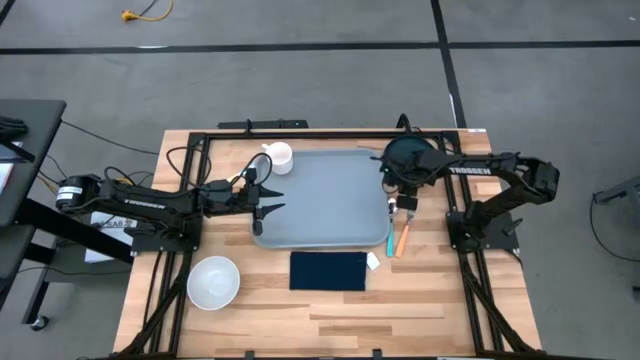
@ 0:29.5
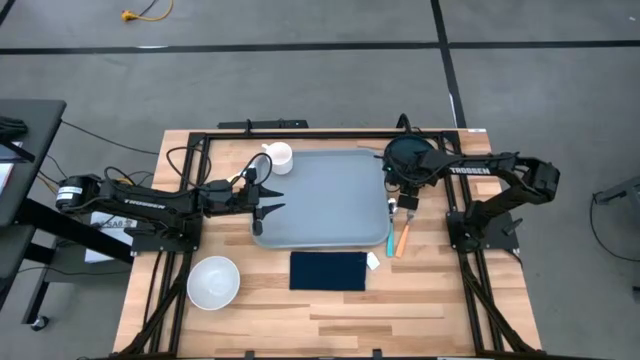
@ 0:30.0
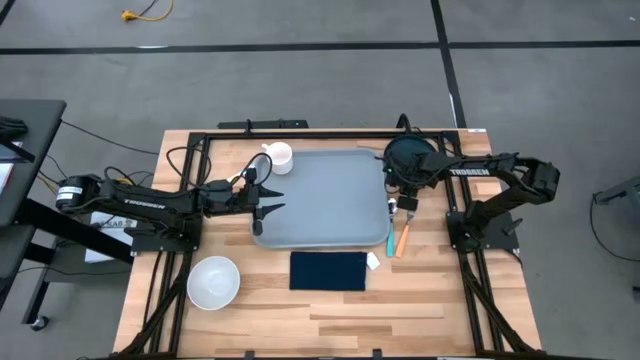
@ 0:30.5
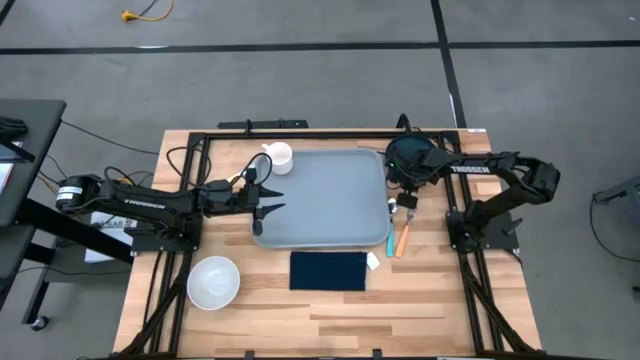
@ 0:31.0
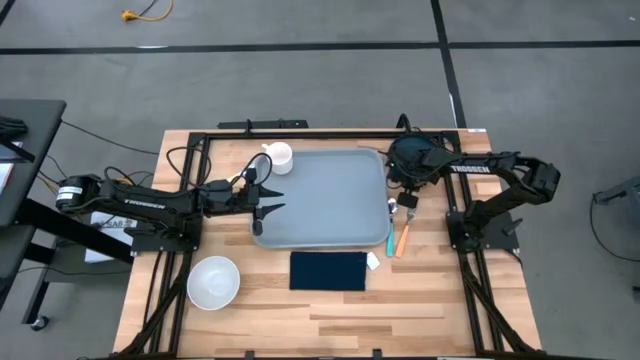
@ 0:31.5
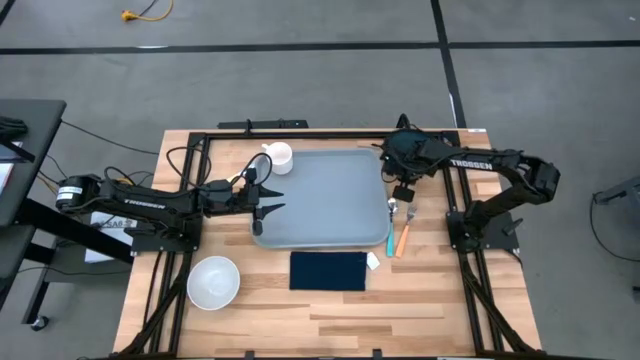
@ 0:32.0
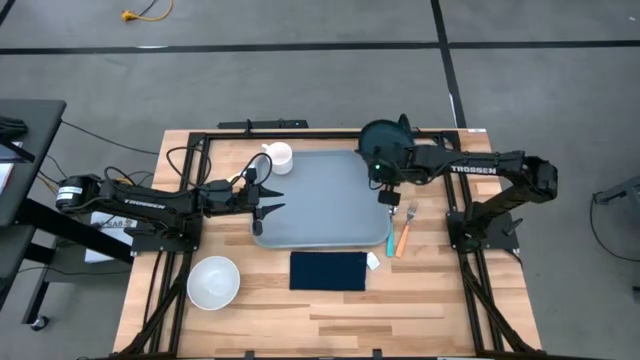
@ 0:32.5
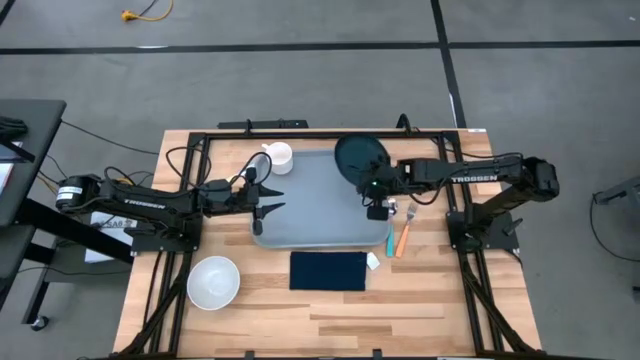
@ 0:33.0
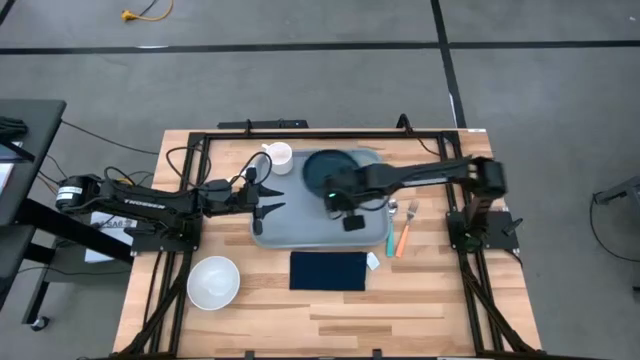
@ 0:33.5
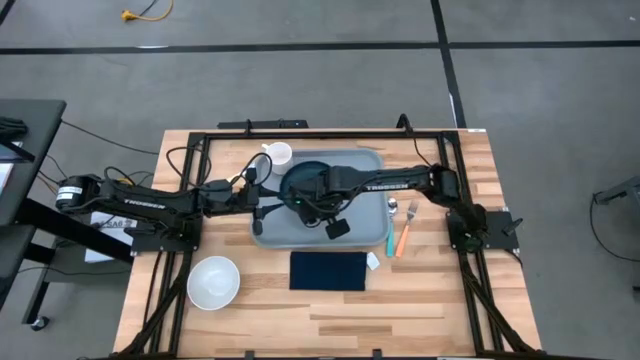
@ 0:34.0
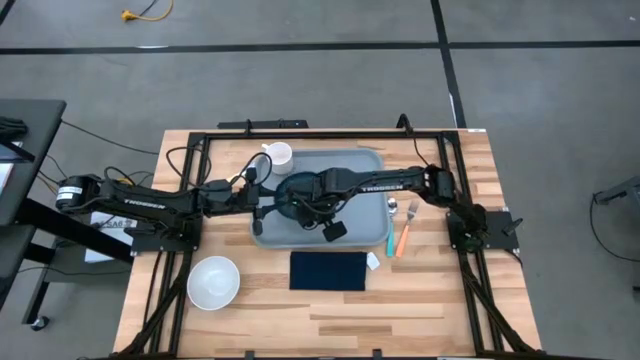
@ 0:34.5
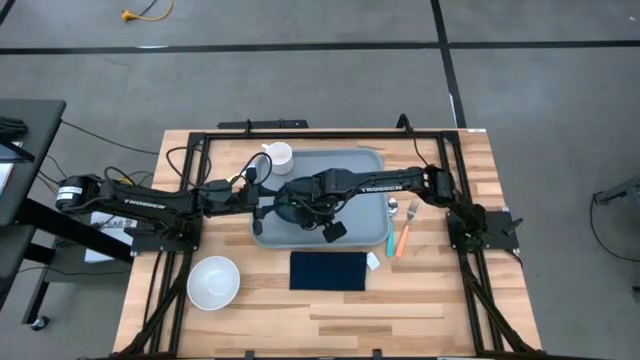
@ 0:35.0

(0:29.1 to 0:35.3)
Task: Set up tray
Put the black plate on the gray tray to the bottom of the white mug

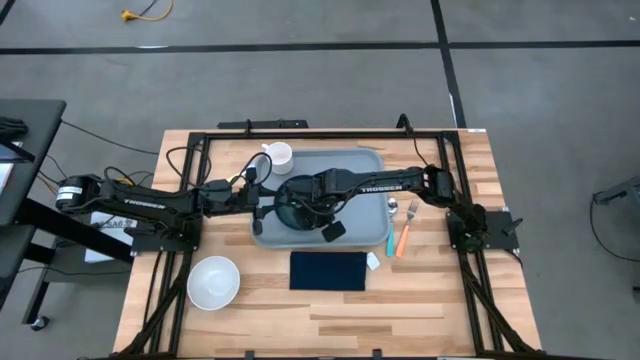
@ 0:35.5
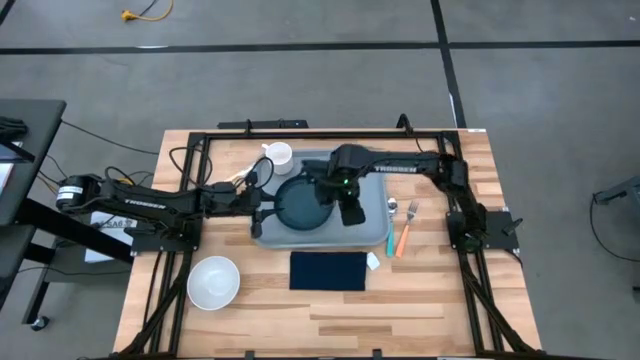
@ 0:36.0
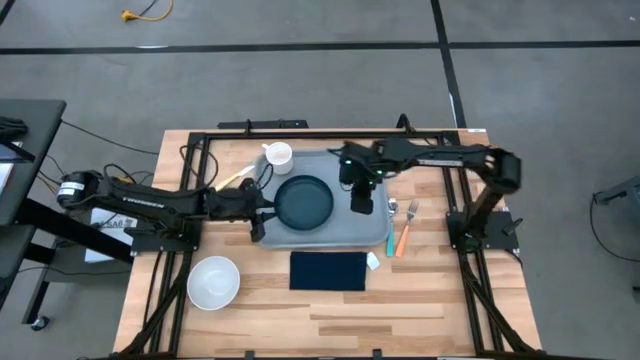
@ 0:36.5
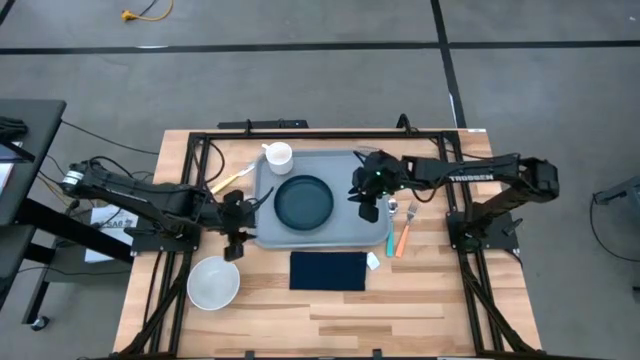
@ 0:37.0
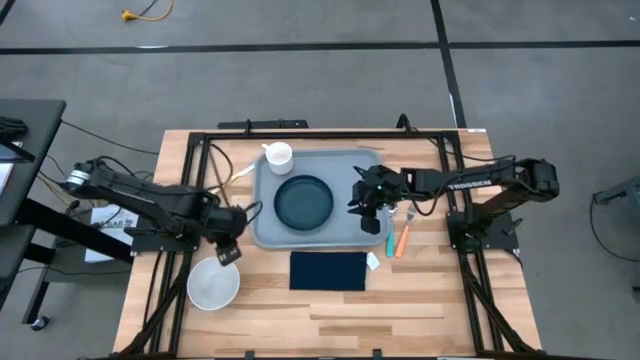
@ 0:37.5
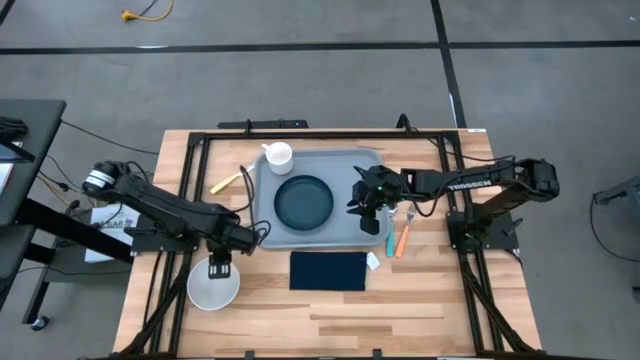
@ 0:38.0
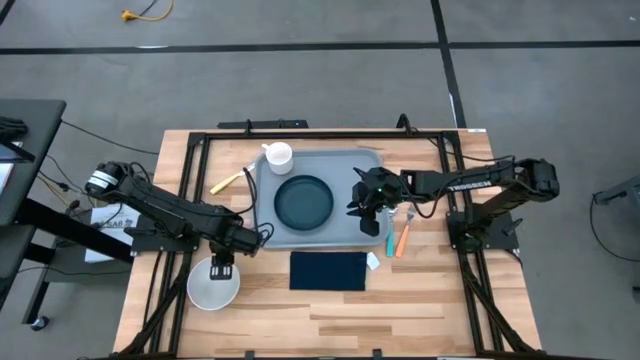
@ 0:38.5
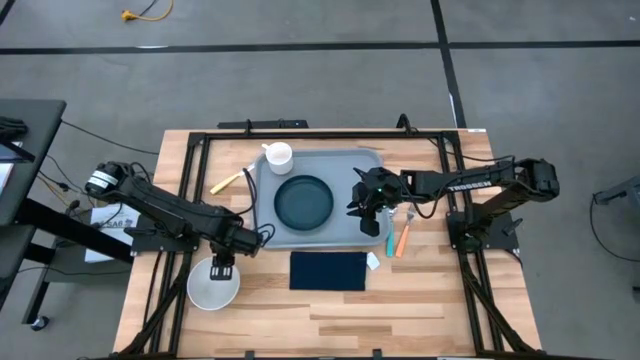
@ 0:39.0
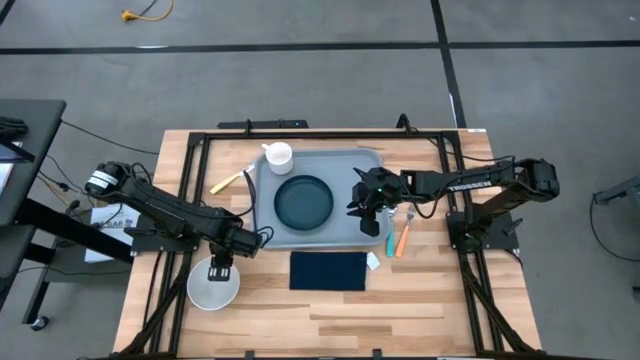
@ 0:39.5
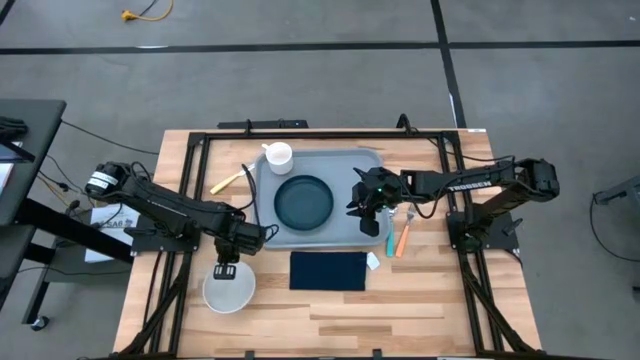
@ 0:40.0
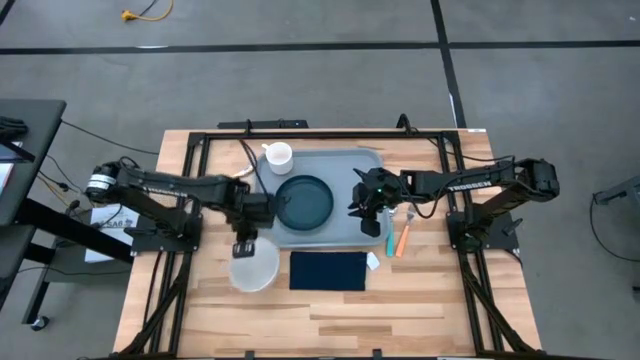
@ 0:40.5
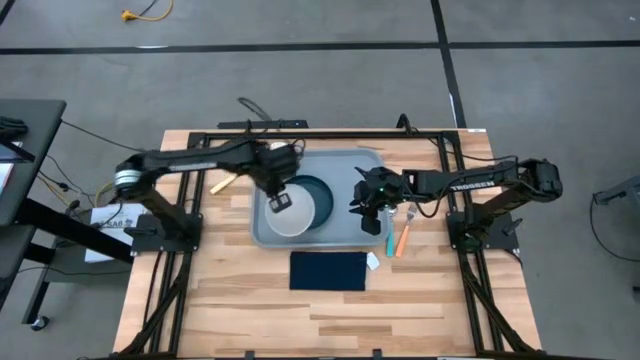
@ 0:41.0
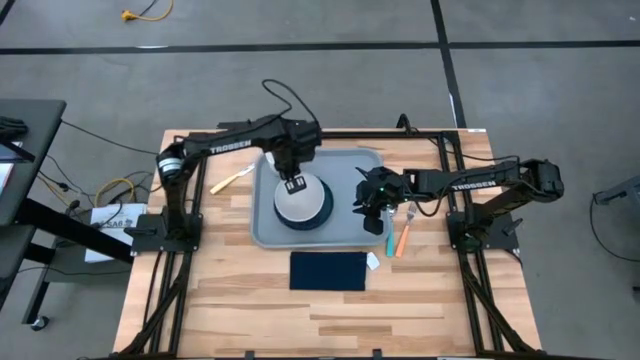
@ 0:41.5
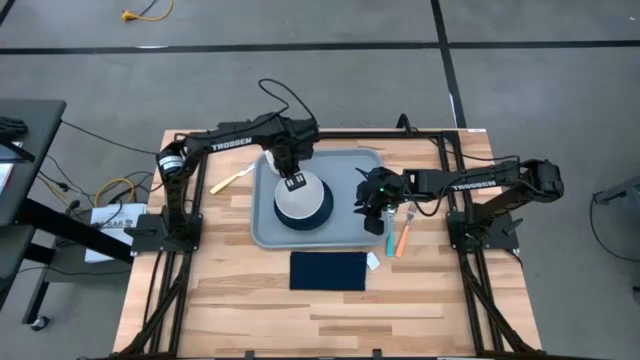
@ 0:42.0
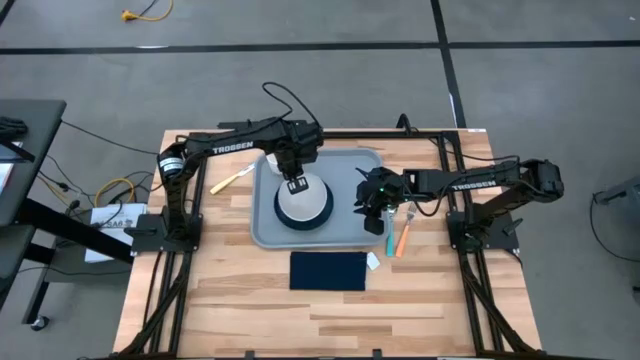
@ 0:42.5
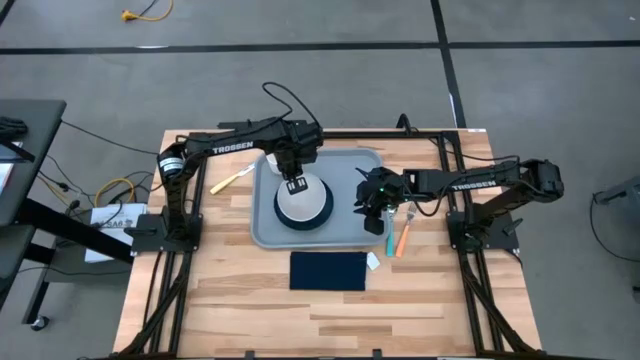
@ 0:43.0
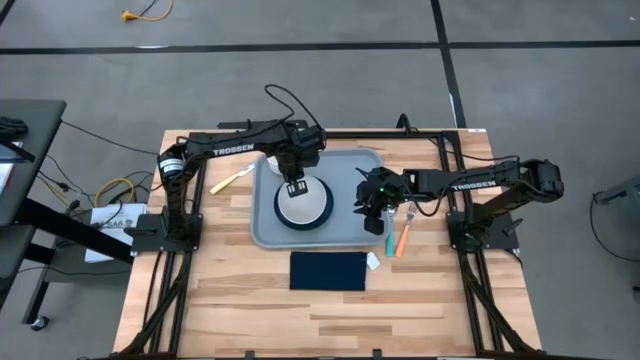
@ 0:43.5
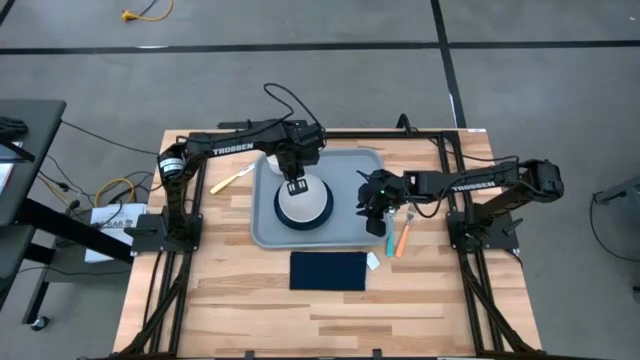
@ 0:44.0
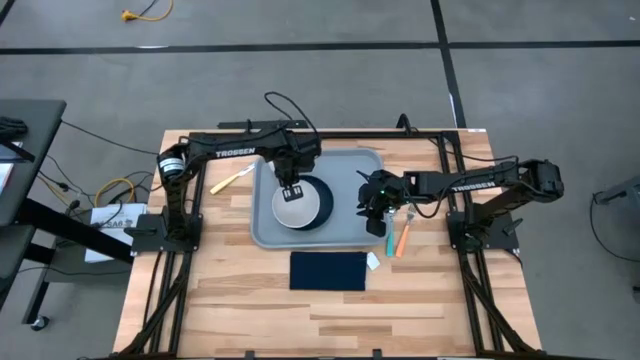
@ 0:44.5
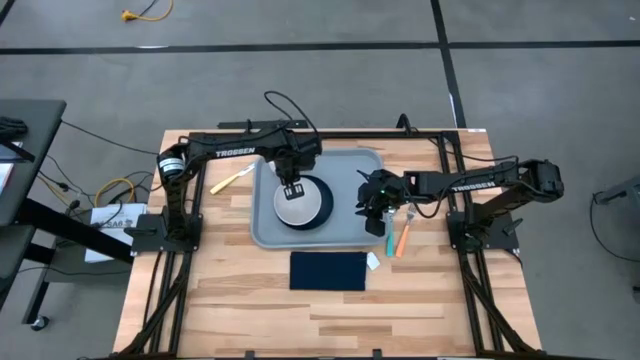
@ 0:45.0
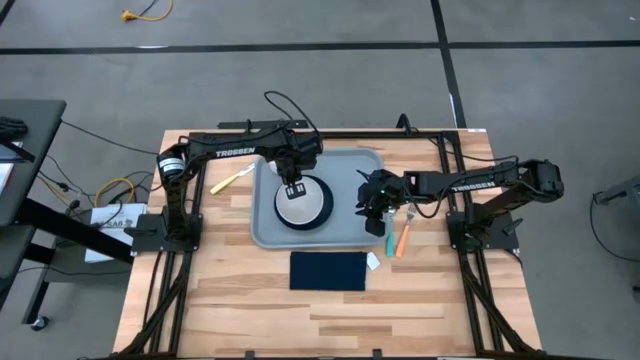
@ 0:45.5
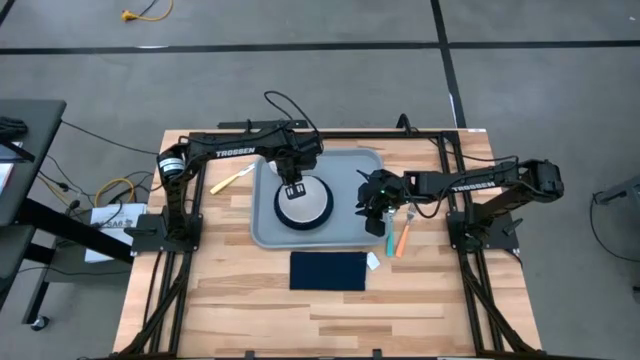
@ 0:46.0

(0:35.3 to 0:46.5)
Put the white bowl on top of the black plate

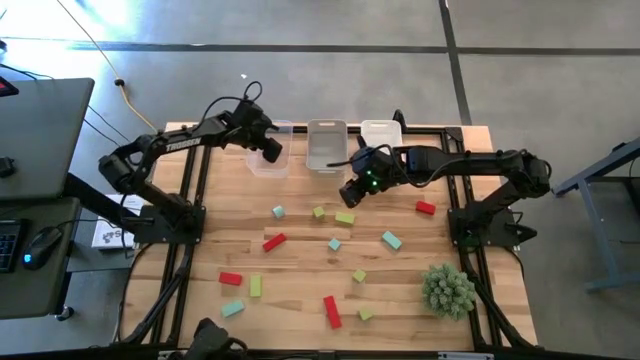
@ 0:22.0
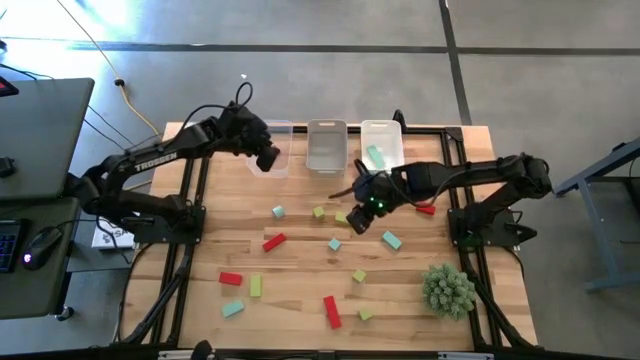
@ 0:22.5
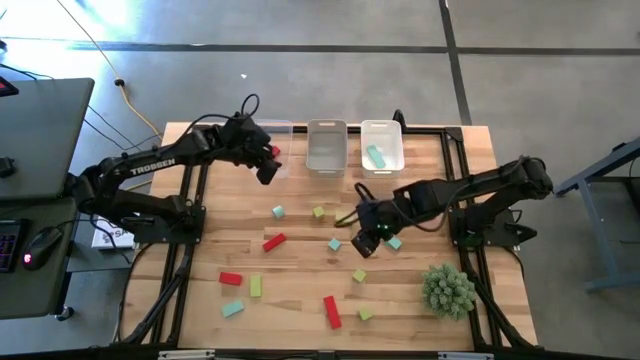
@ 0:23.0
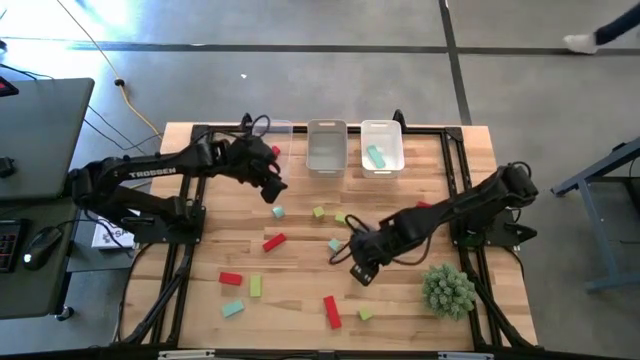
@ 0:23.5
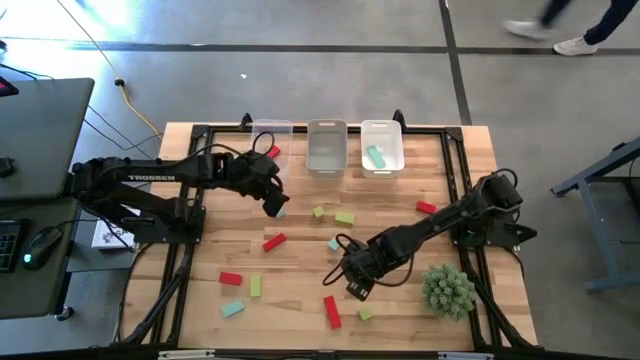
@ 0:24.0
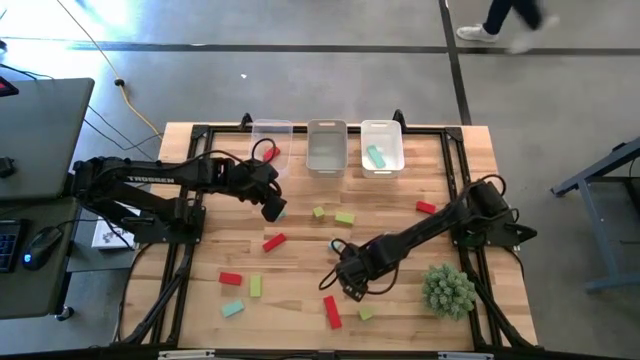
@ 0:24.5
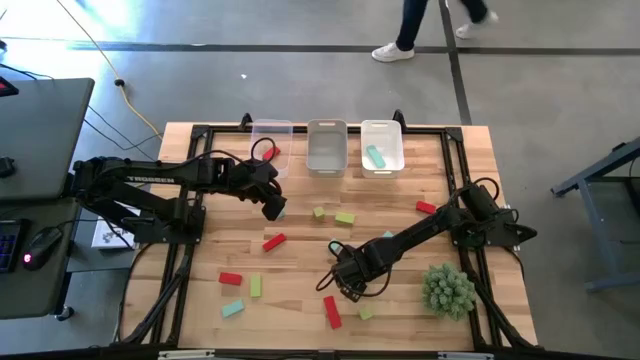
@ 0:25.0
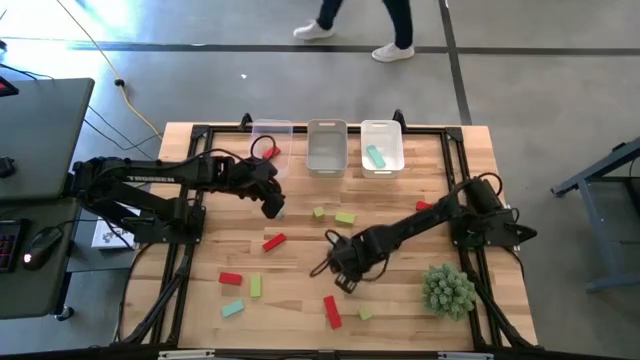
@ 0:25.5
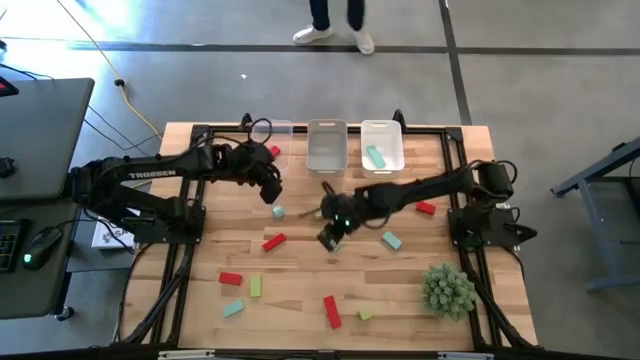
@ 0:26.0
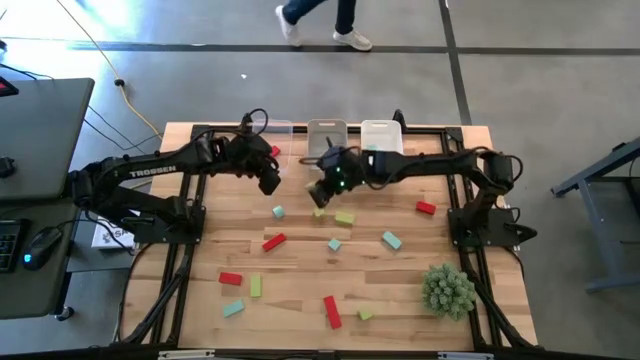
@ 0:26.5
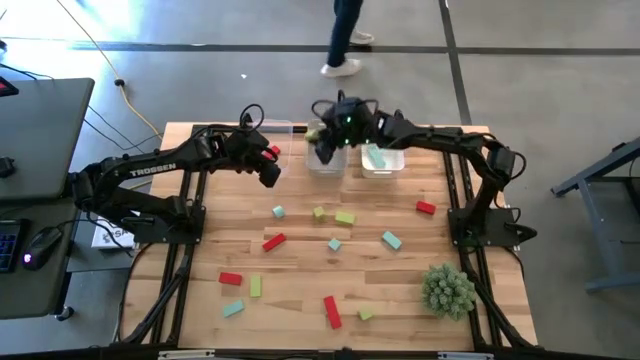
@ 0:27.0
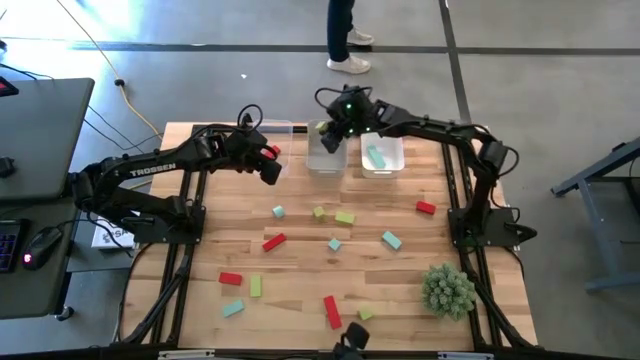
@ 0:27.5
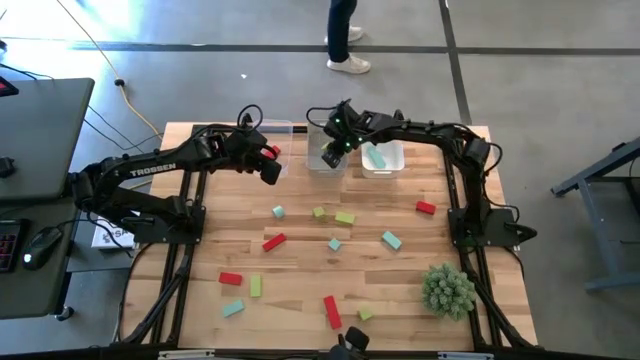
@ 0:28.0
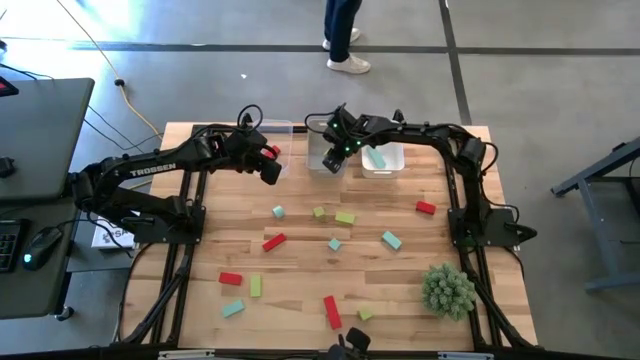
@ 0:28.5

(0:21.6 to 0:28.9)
Task: Sort & place blocks by color
Put the green block into the gray bin
